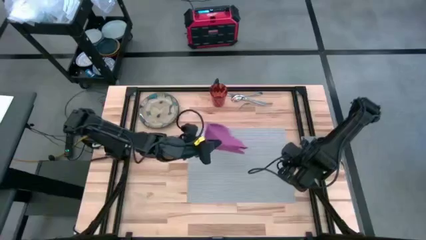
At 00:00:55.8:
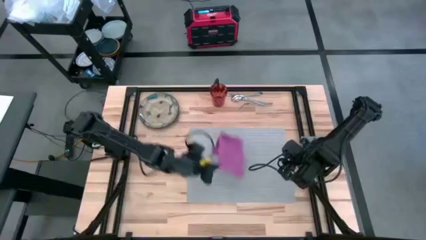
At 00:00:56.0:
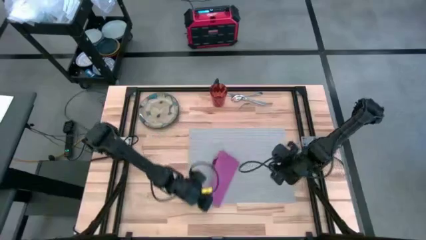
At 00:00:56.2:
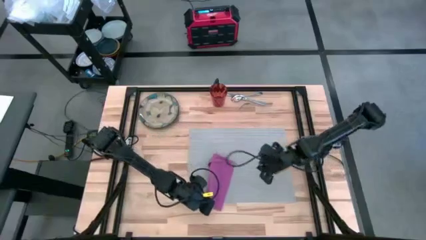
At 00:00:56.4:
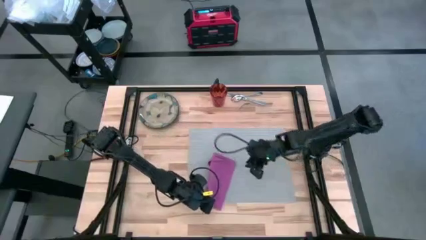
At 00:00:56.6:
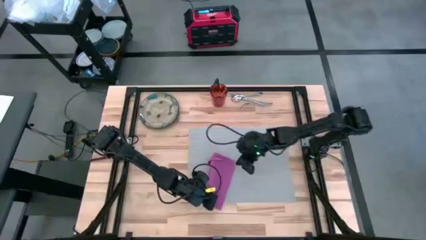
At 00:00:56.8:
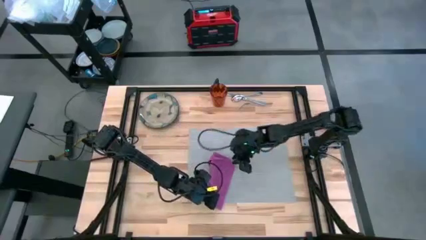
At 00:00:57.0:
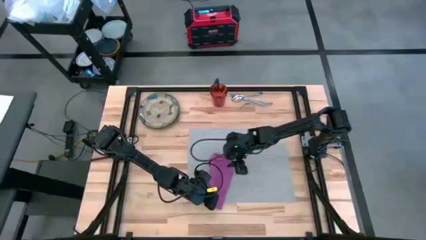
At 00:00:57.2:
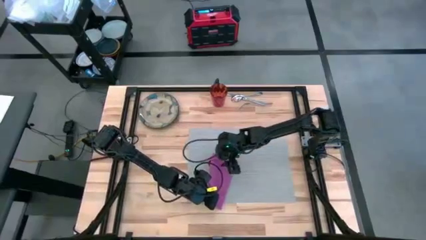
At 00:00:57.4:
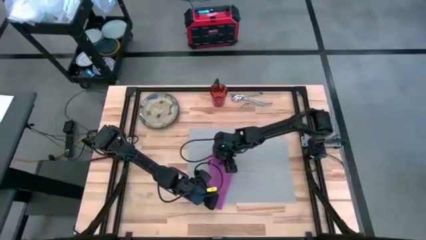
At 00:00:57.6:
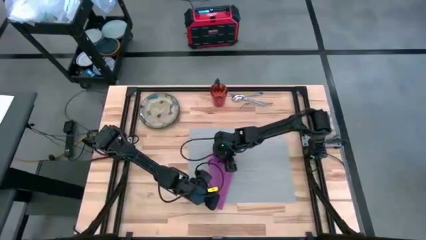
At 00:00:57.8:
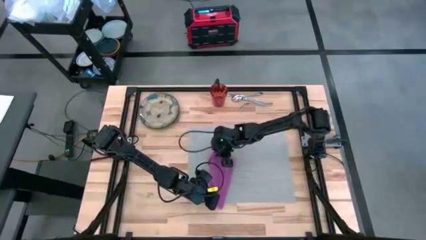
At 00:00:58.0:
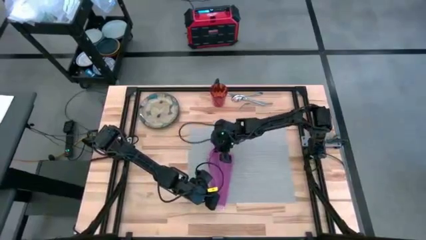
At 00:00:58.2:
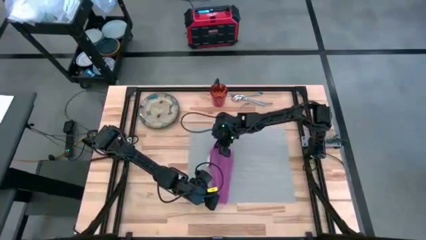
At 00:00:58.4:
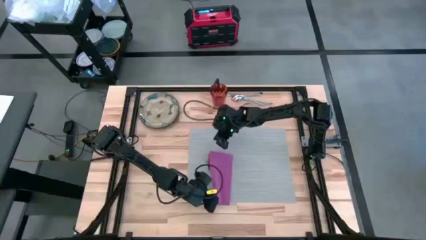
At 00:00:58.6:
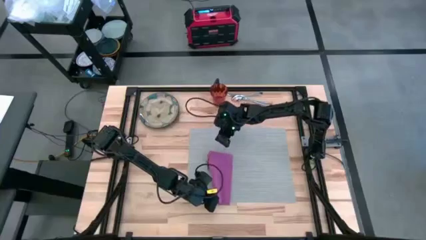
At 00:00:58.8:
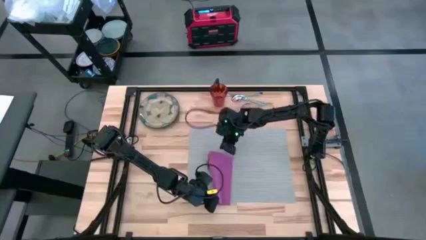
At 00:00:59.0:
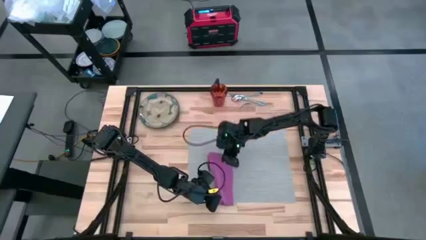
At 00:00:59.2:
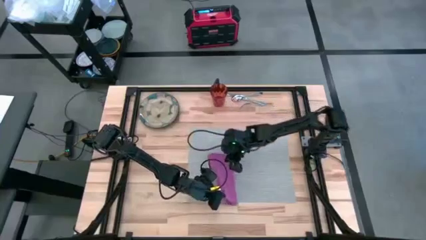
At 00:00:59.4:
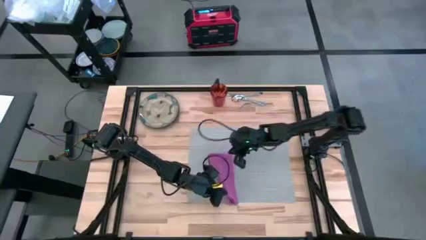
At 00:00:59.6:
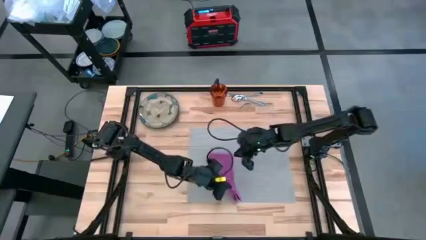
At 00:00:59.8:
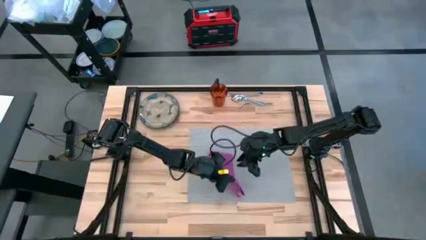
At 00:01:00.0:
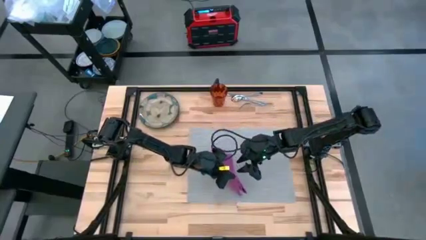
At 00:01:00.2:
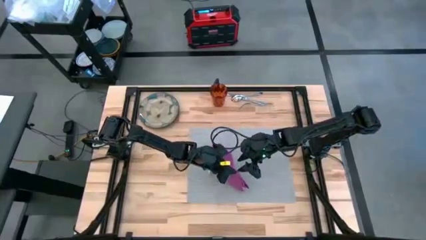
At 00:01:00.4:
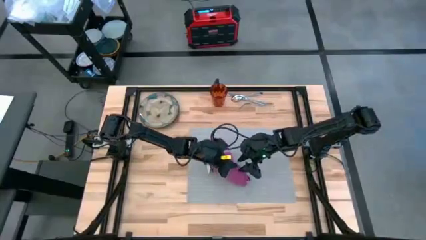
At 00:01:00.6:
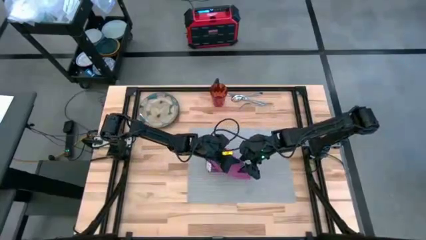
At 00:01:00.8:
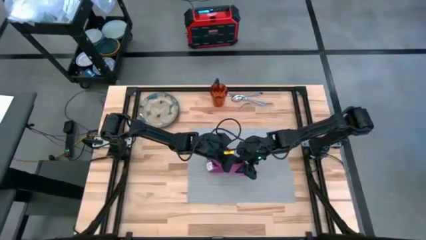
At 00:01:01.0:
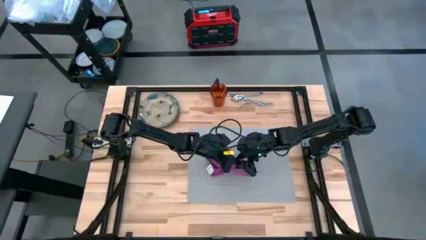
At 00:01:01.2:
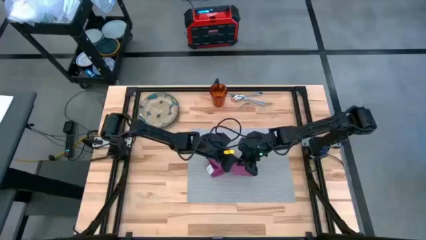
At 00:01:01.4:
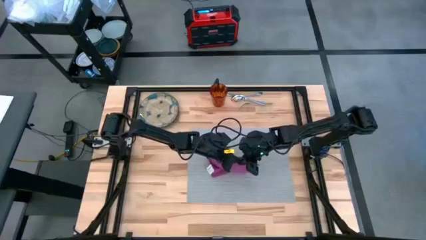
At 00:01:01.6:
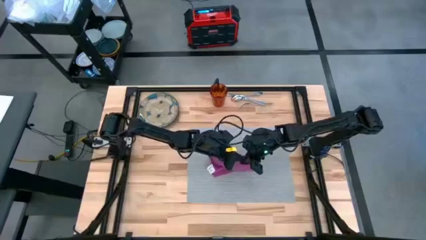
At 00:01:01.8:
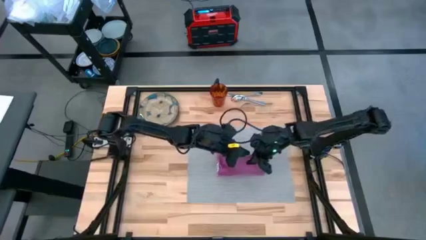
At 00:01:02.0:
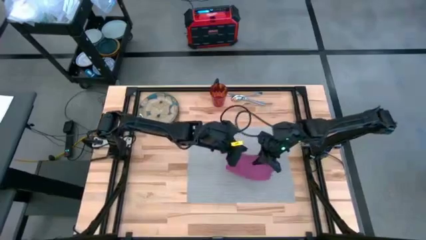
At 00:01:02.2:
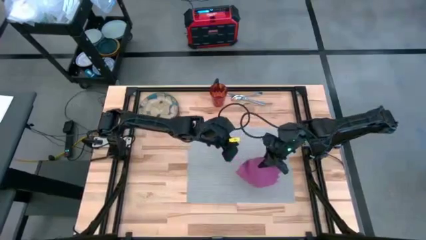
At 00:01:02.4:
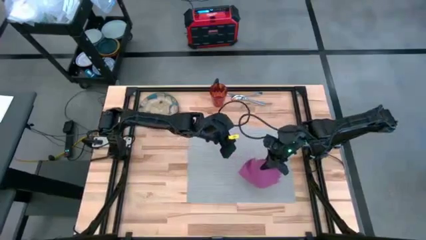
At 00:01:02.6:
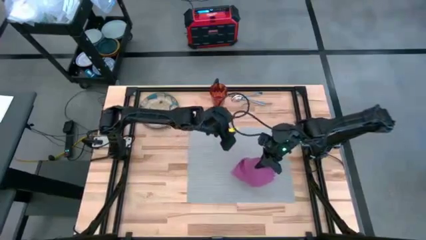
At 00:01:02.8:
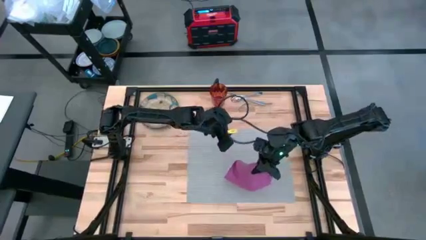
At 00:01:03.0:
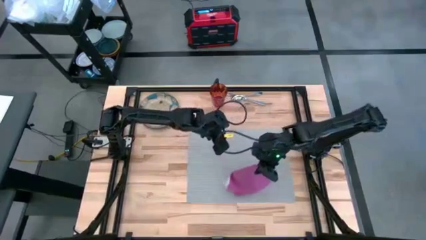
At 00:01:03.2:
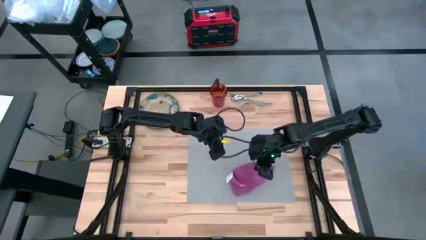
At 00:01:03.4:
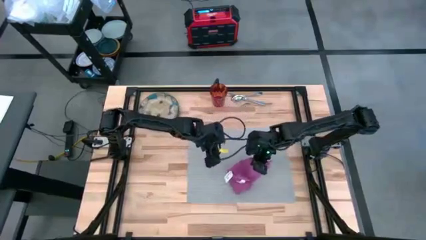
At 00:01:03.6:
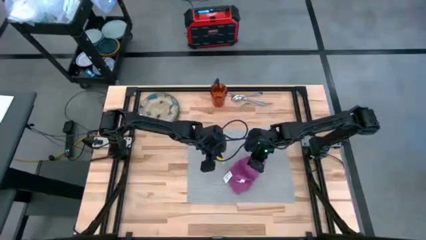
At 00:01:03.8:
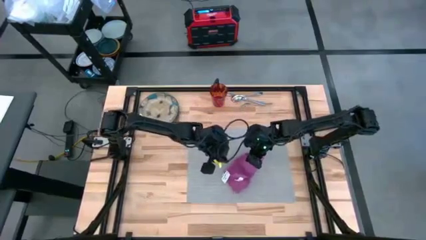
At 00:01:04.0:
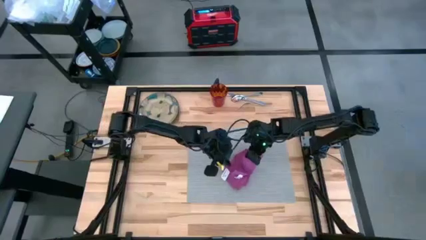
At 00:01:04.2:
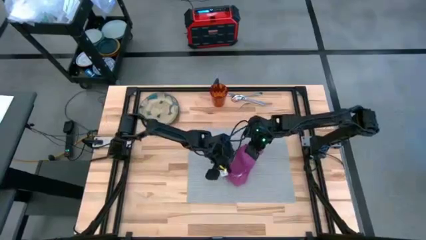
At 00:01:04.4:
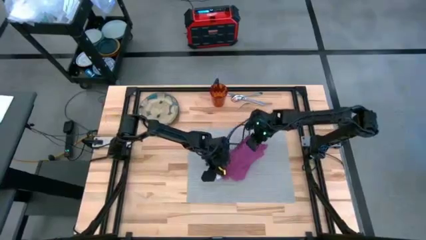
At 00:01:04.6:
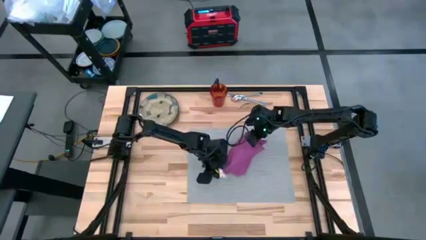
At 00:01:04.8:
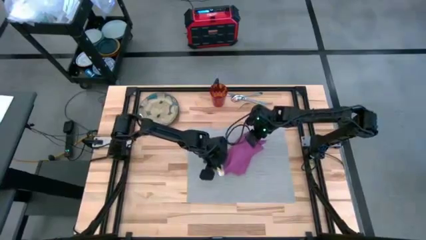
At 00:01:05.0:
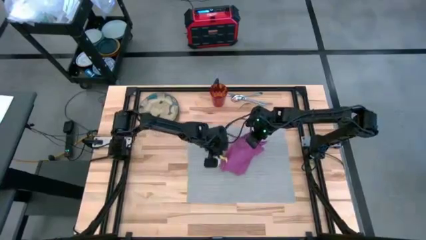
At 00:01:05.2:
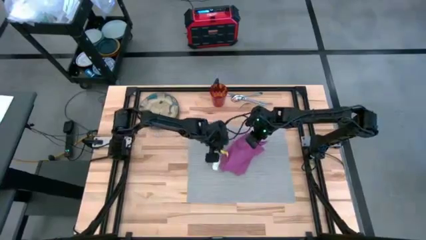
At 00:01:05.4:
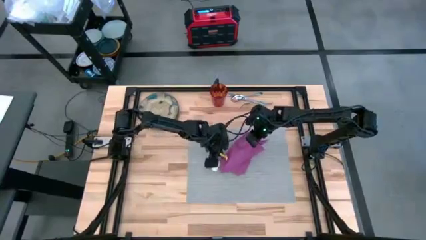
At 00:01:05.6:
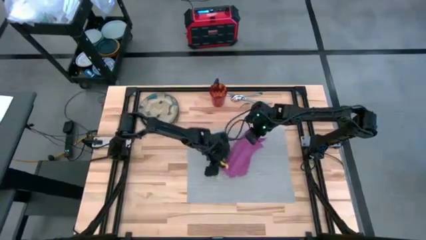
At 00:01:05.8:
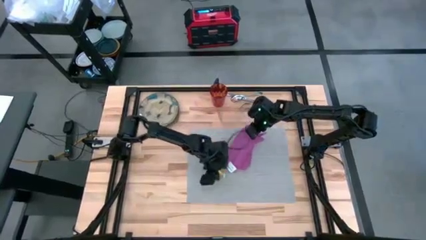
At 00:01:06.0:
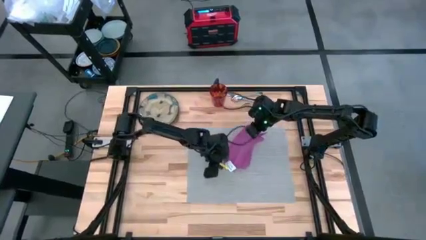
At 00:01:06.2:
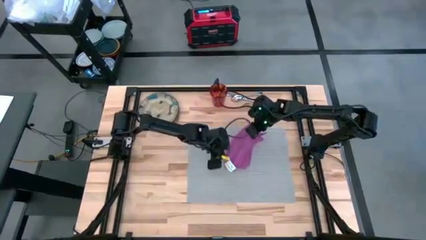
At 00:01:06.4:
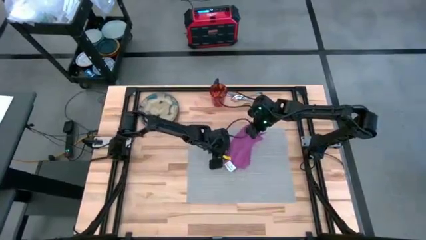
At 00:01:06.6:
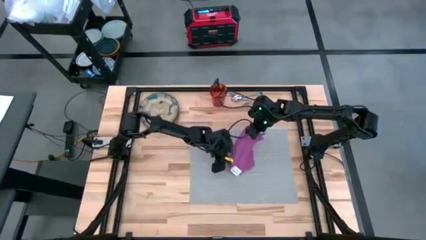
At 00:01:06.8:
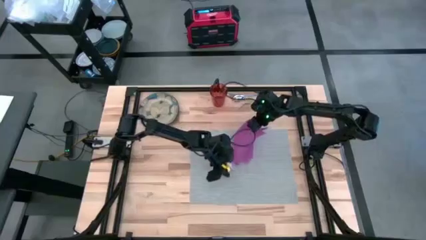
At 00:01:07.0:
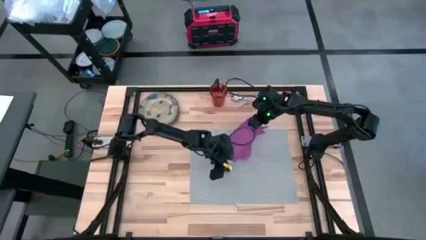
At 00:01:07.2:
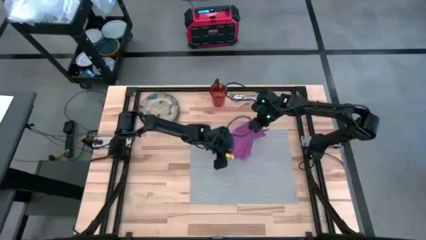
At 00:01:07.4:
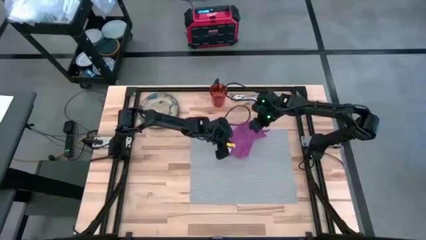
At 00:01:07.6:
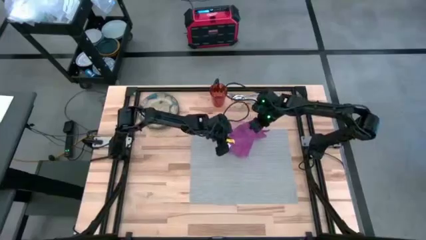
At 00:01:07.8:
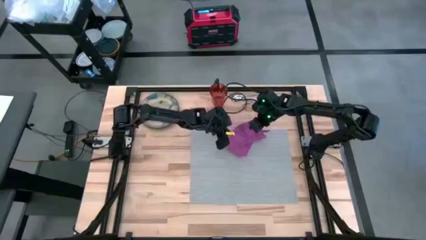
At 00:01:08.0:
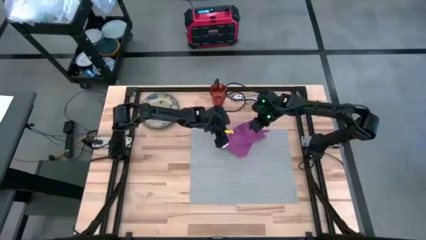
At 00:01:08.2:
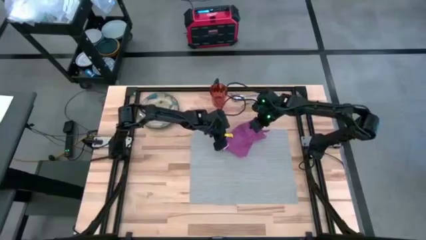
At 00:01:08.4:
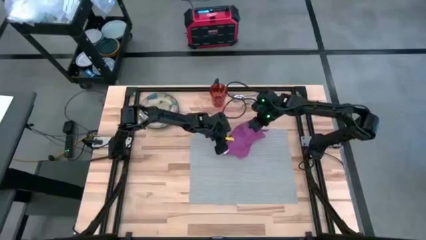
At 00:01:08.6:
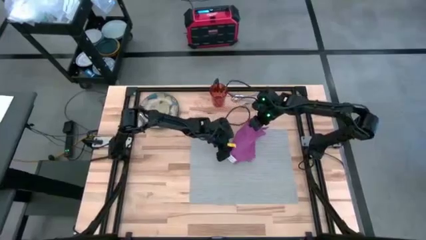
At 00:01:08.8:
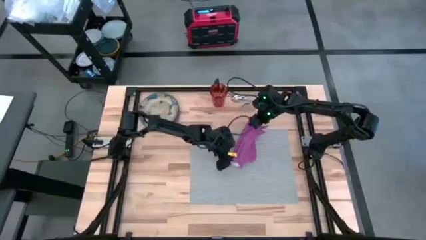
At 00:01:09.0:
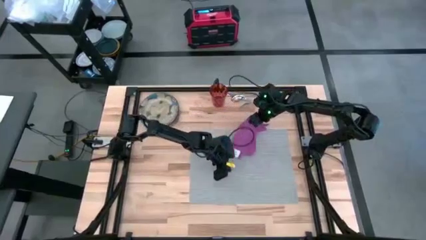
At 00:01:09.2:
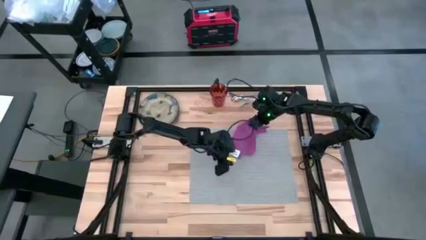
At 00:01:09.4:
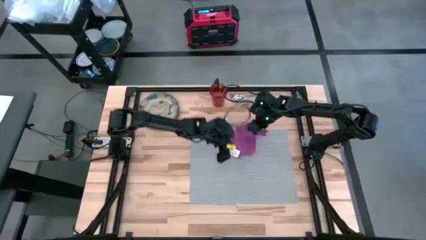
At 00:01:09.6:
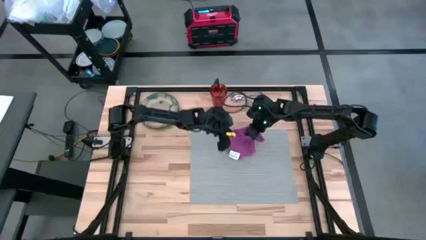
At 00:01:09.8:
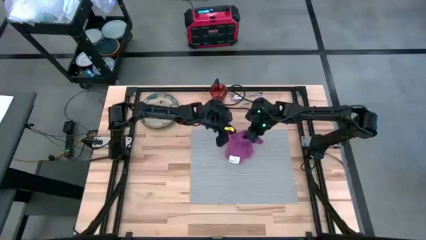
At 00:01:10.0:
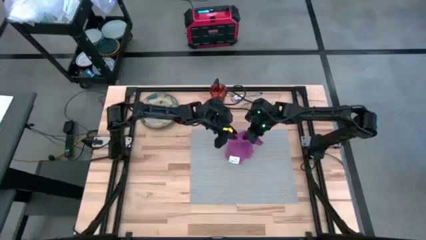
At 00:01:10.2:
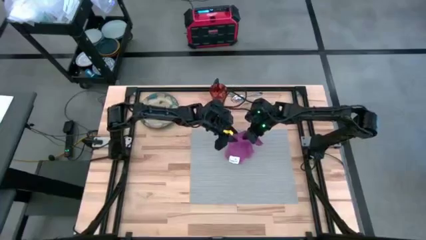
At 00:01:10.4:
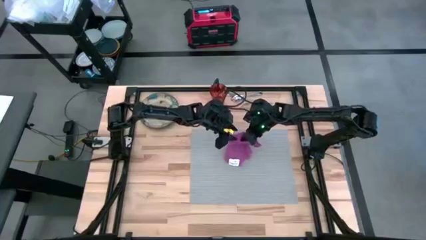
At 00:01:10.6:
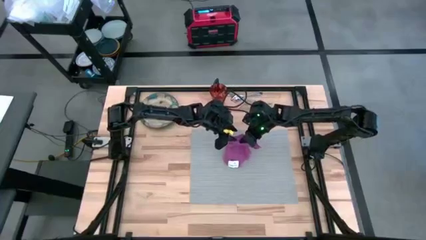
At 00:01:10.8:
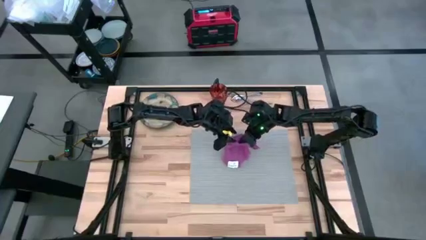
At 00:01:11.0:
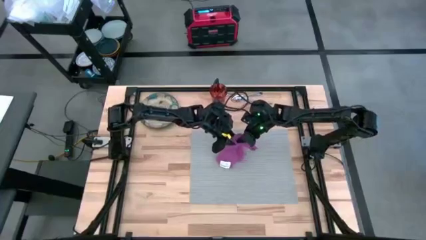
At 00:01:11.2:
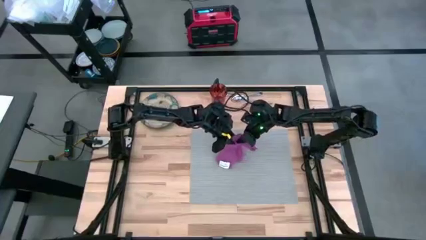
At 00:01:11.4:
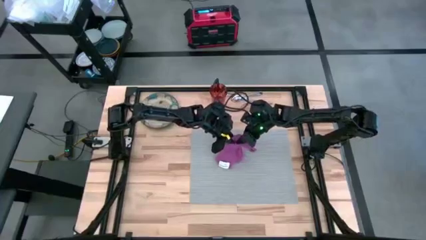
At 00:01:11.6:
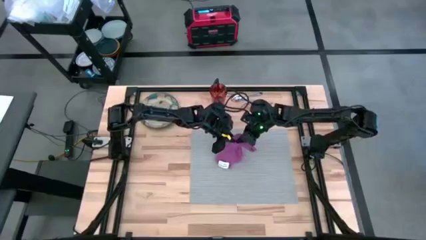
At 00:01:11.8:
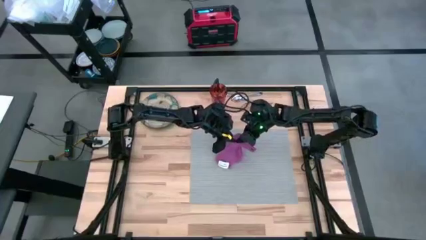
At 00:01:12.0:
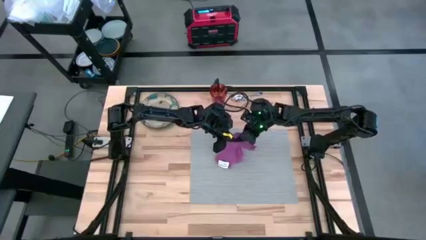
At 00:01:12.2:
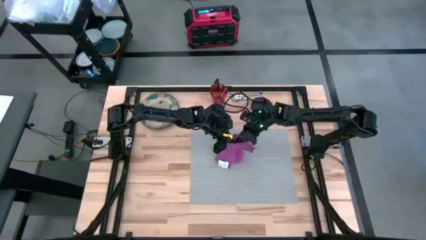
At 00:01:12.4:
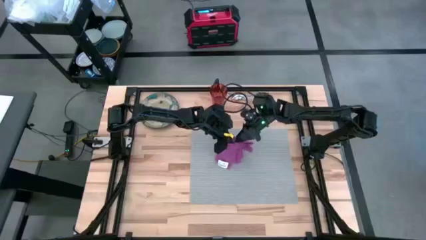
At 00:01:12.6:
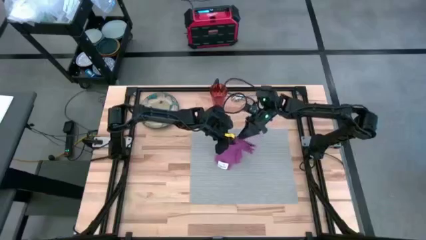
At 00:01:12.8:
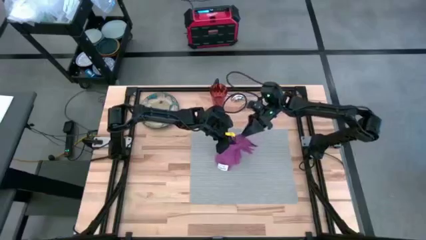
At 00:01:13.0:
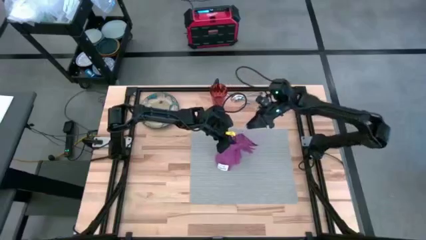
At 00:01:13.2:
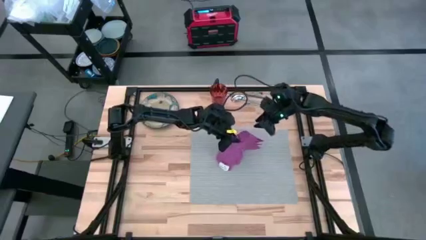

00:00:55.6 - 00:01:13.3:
Task: Set table place
Fold the pink table napkin
